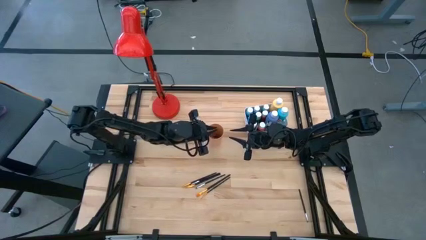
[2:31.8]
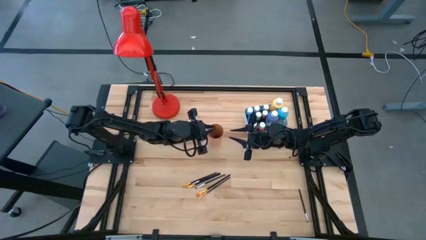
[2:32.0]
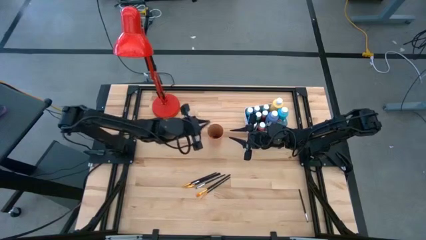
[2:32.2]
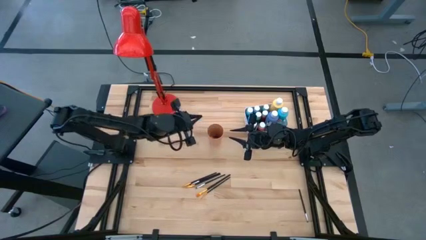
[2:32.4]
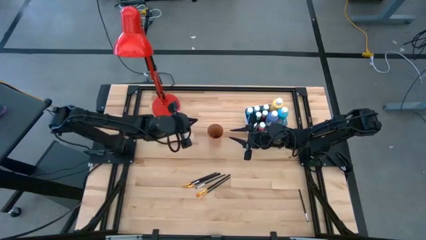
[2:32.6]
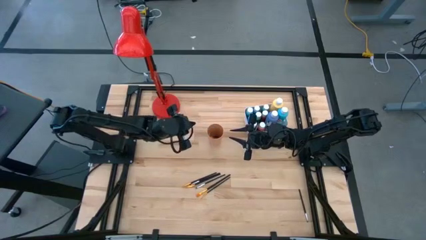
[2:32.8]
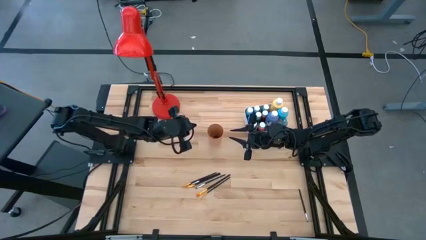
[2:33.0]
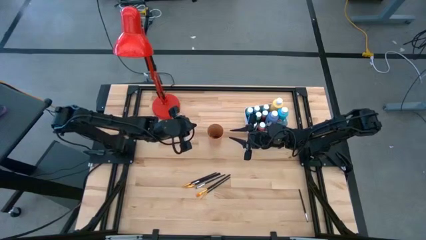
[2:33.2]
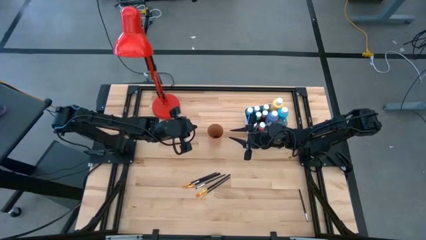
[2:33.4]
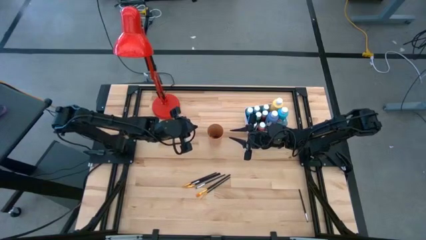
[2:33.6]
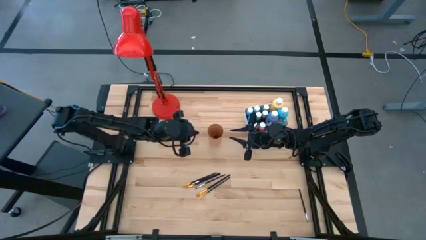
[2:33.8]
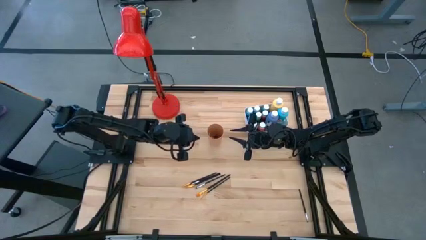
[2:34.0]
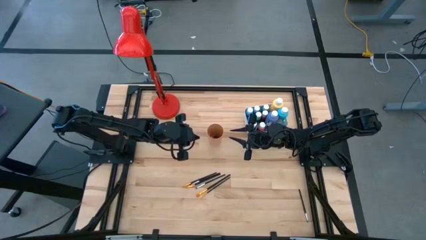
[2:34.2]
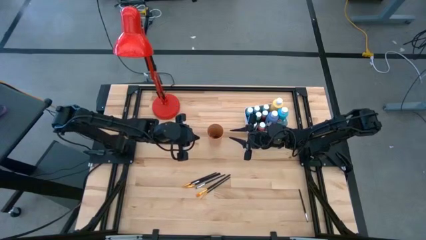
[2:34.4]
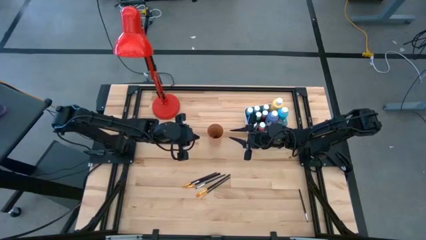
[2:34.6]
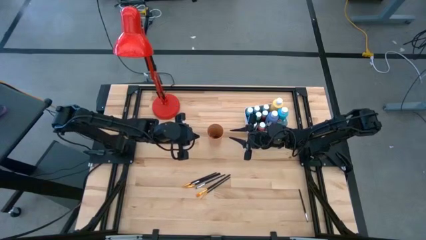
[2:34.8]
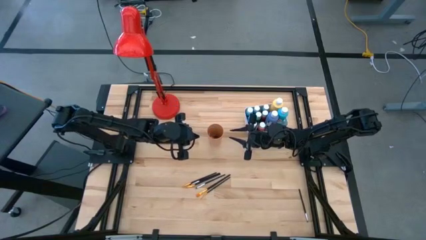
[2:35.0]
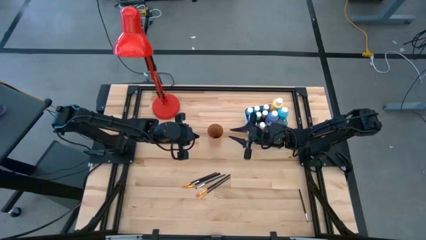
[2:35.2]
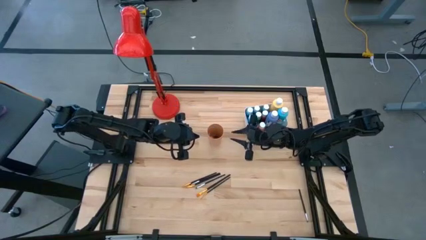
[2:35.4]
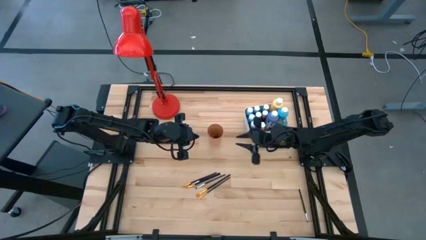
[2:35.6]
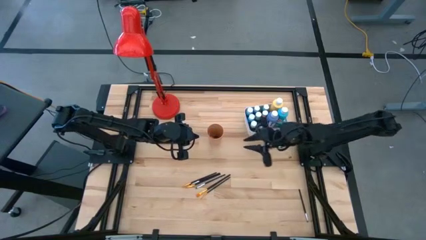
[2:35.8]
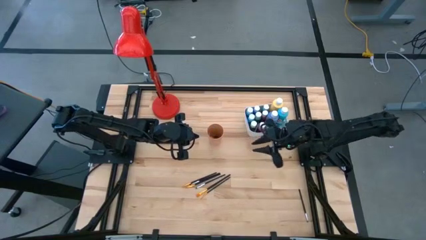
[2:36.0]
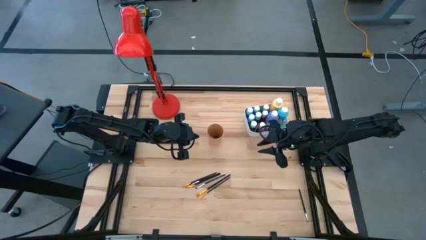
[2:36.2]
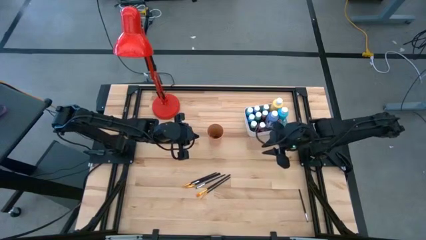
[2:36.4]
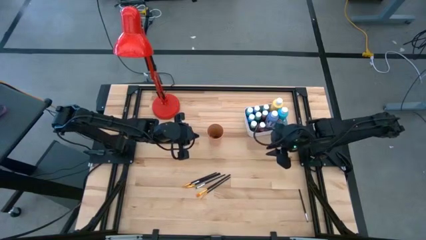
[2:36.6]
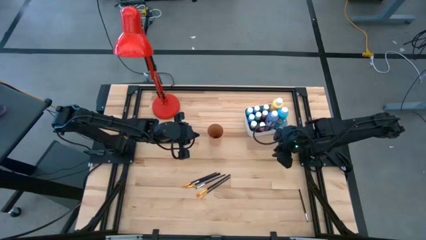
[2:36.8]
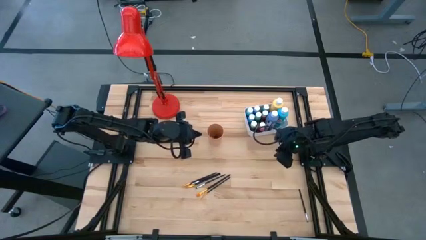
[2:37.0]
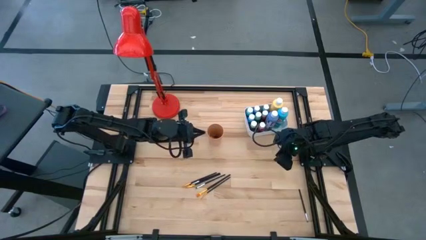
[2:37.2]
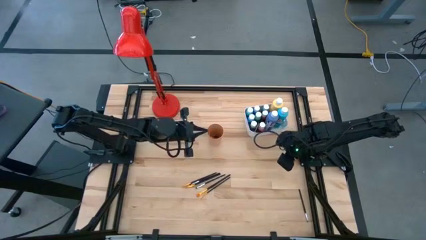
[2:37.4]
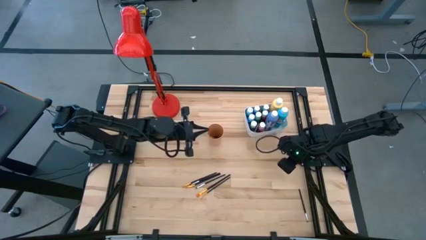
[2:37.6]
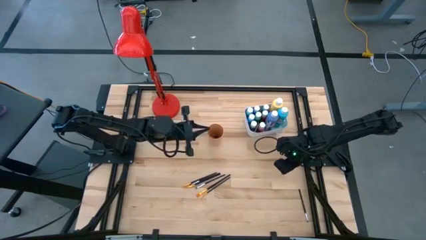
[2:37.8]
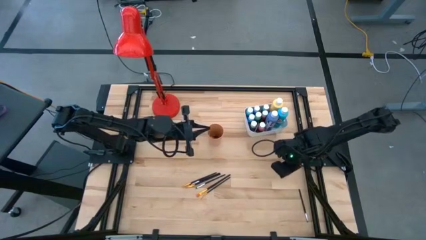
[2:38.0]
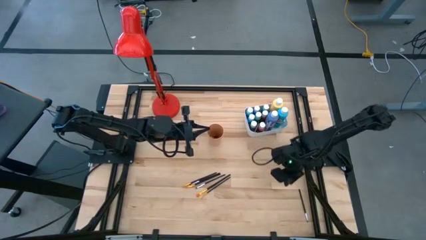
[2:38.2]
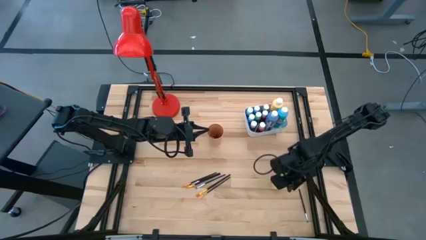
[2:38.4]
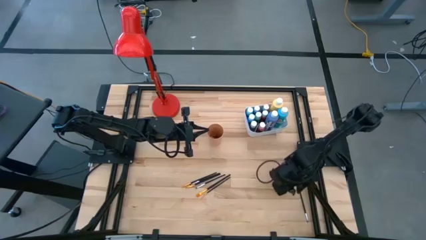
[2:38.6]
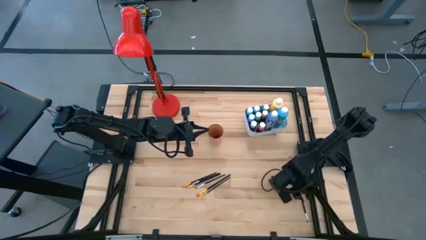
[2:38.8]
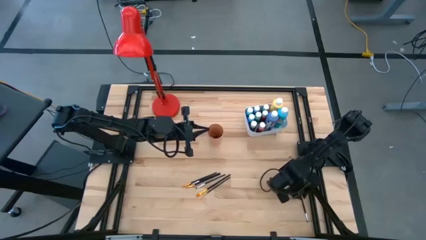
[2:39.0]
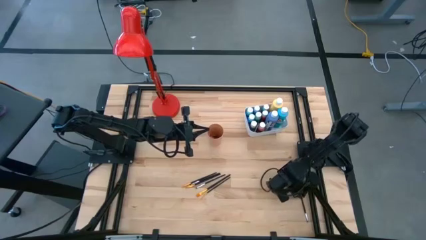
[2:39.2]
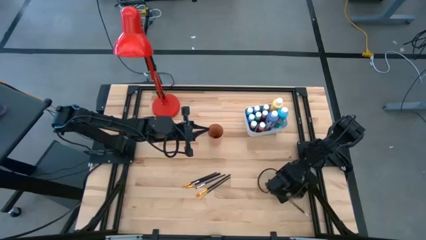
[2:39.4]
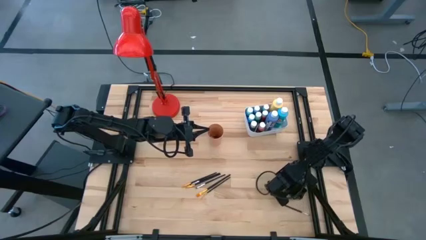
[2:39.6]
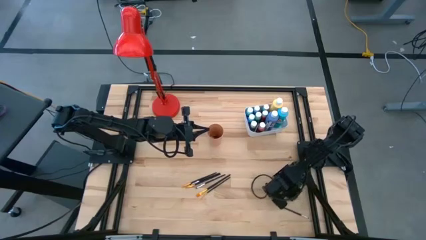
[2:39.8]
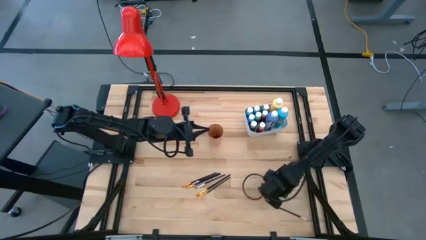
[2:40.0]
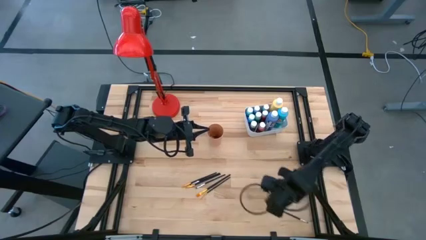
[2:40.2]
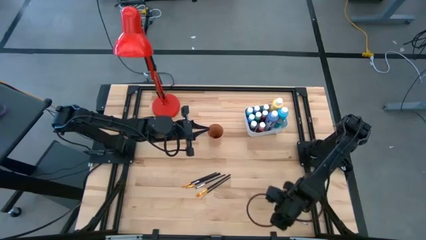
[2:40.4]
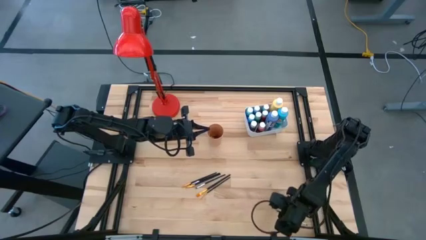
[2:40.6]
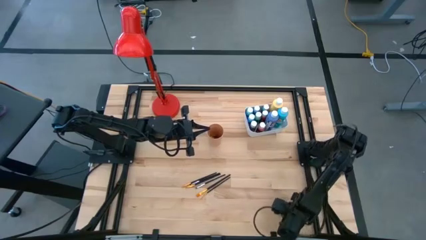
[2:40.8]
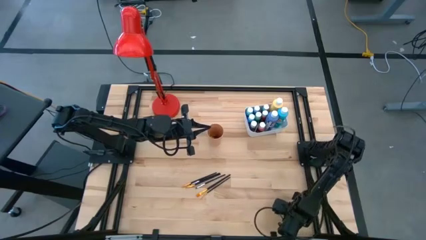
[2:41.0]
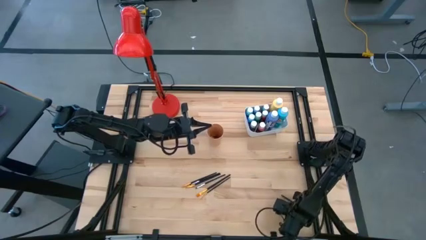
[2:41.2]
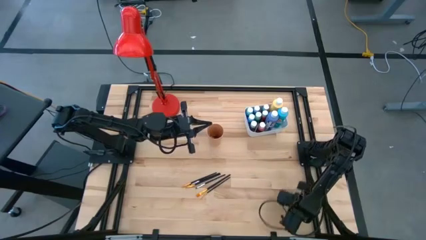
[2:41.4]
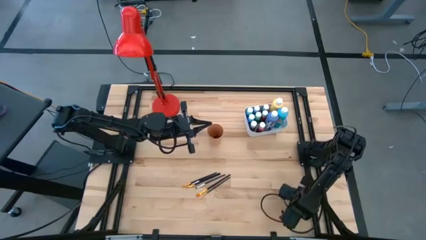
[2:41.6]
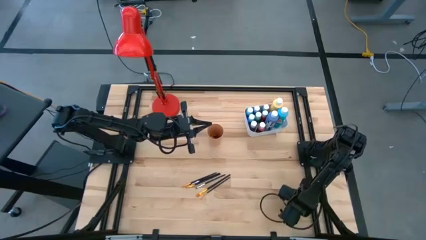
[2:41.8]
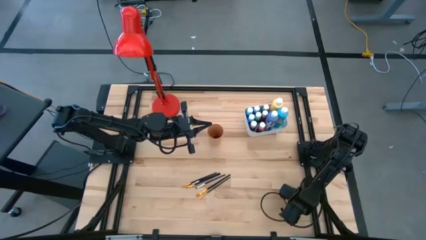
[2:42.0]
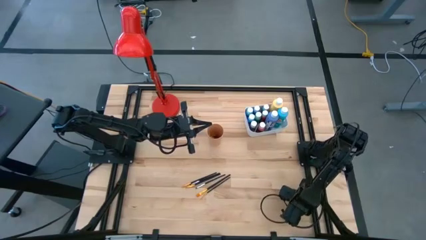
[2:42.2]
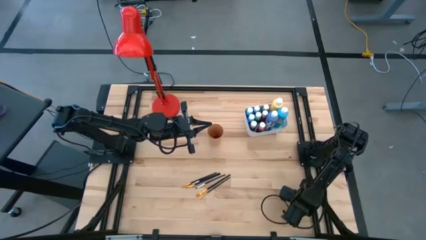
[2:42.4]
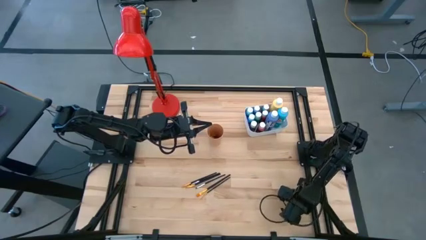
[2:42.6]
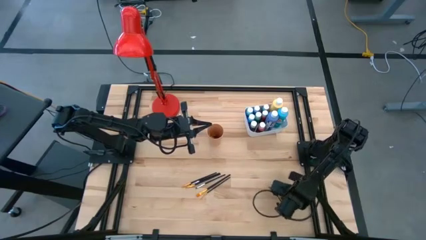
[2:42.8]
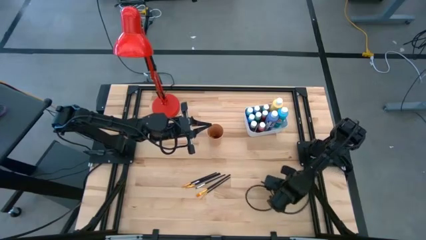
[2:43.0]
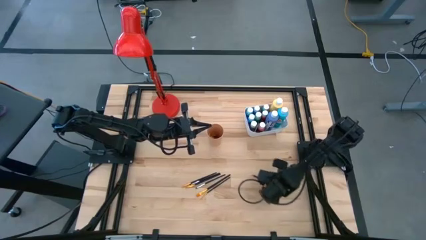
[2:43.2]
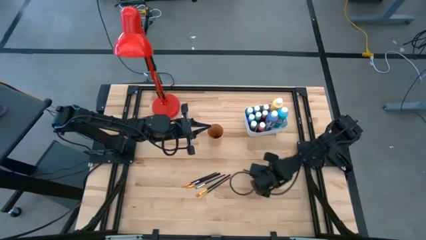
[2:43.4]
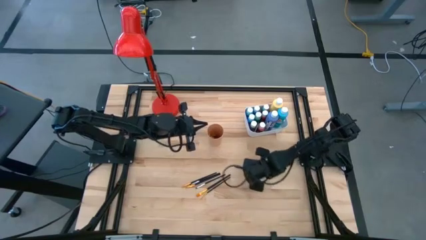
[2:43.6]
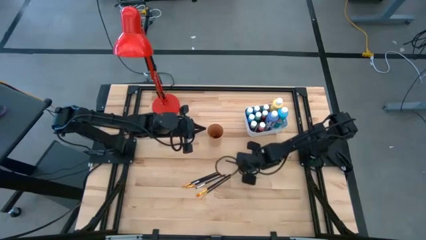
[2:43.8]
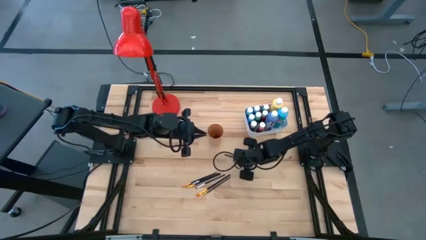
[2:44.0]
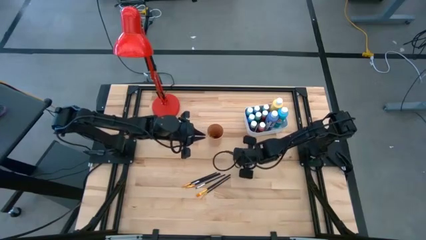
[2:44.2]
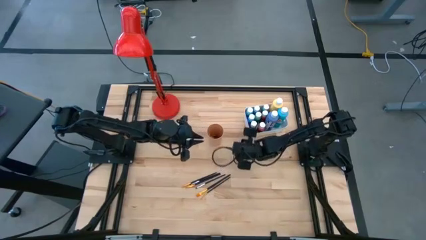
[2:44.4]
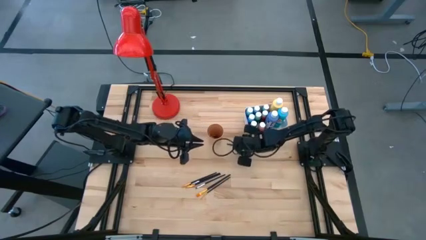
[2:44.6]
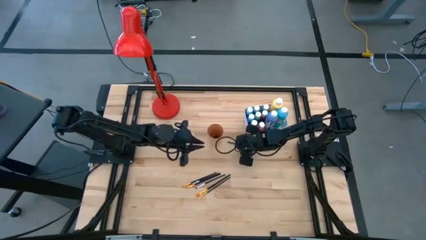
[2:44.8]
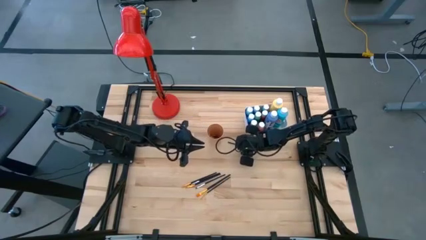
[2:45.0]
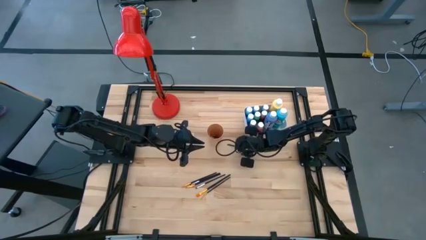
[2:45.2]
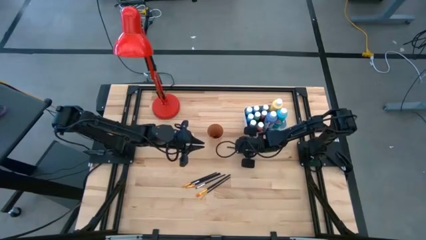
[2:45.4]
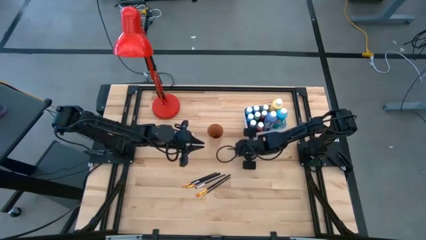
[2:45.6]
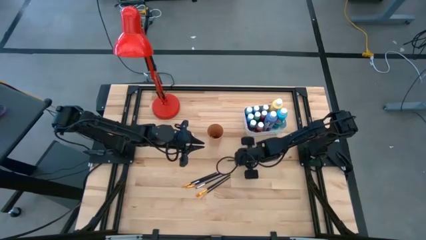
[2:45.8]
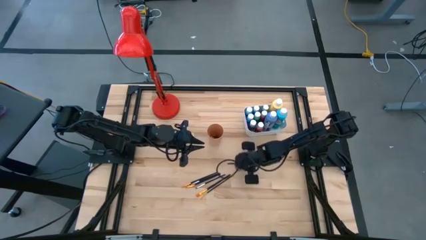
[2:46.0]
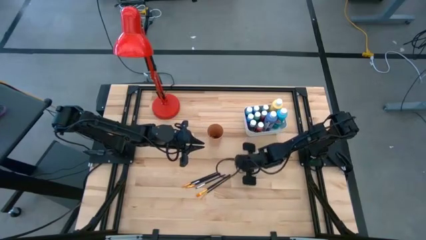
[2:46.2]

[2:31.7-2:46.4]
Task: Pick & Place Paint Supplies
Put the white paint brush into the orange cup
